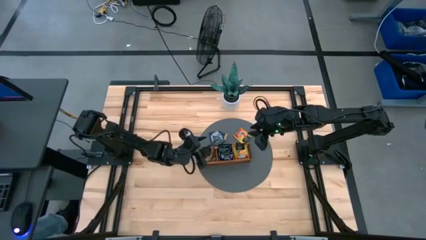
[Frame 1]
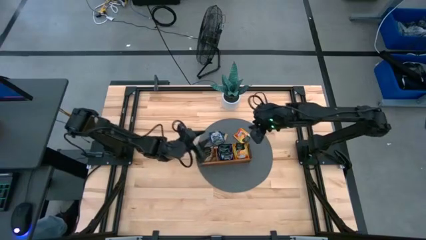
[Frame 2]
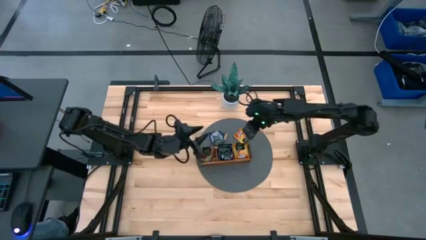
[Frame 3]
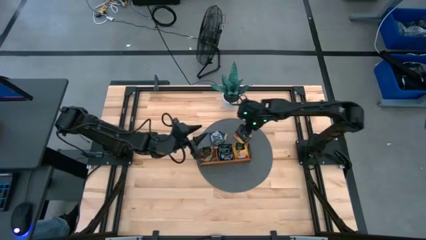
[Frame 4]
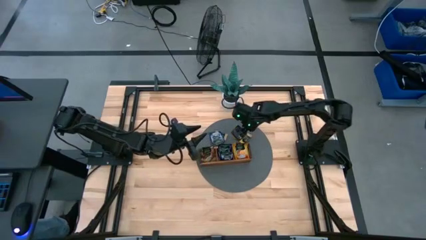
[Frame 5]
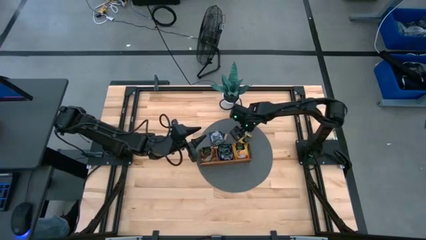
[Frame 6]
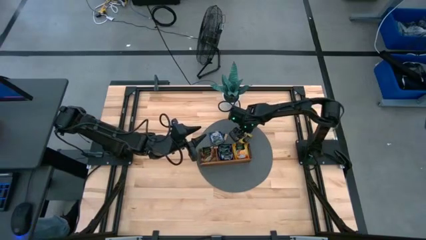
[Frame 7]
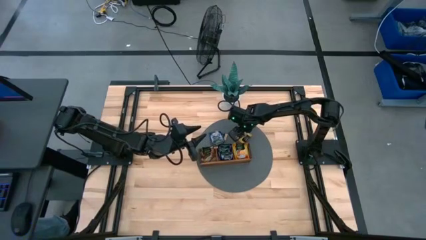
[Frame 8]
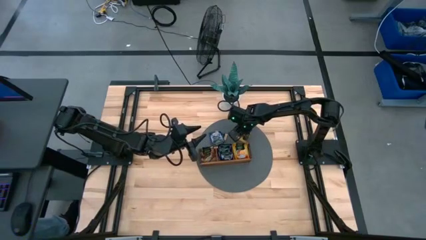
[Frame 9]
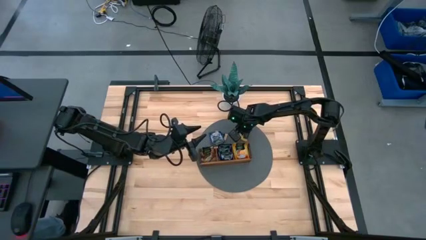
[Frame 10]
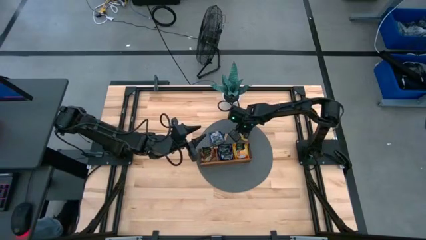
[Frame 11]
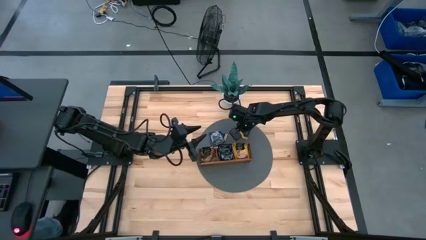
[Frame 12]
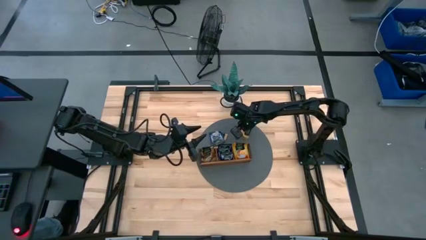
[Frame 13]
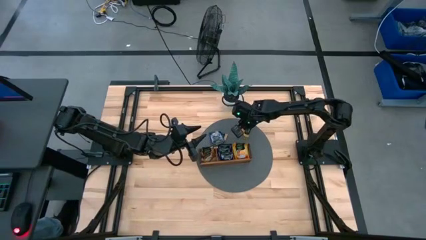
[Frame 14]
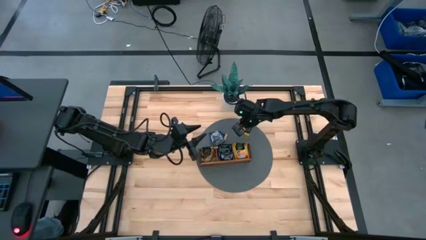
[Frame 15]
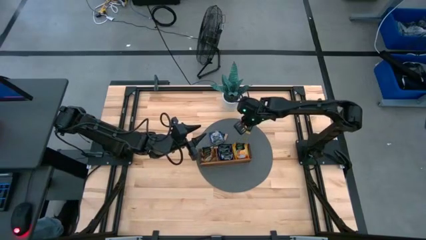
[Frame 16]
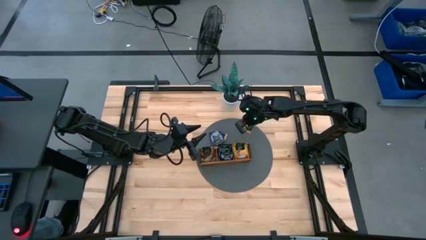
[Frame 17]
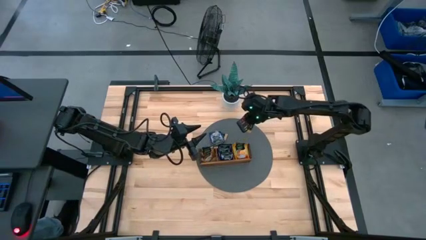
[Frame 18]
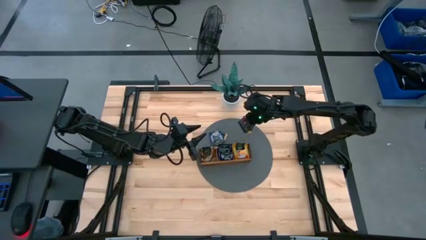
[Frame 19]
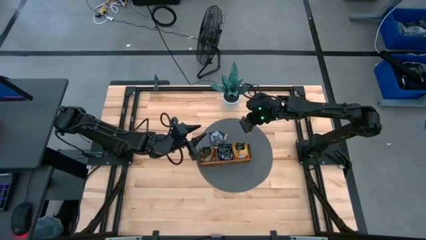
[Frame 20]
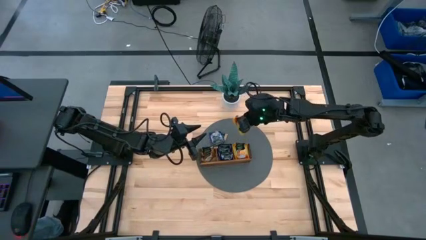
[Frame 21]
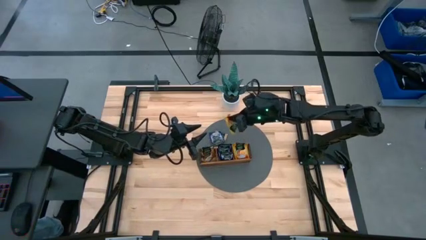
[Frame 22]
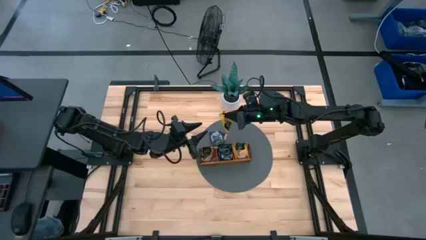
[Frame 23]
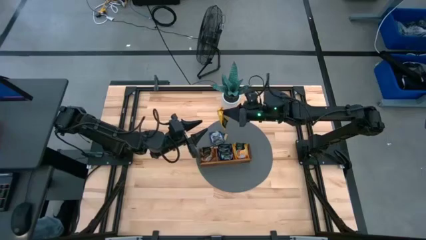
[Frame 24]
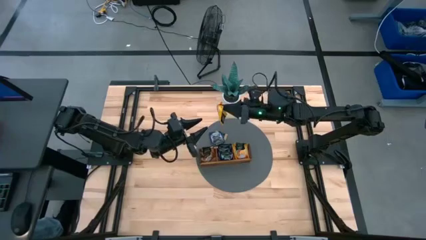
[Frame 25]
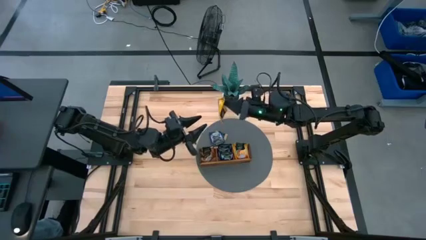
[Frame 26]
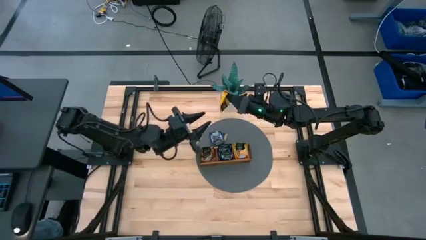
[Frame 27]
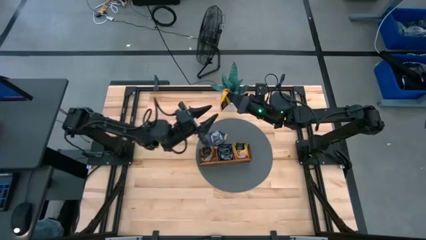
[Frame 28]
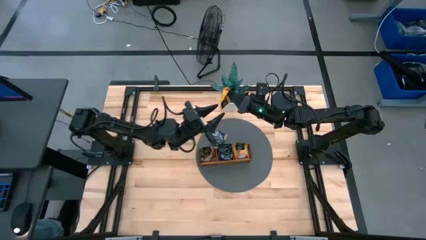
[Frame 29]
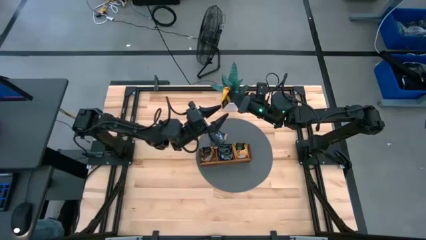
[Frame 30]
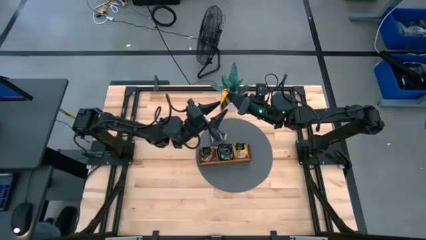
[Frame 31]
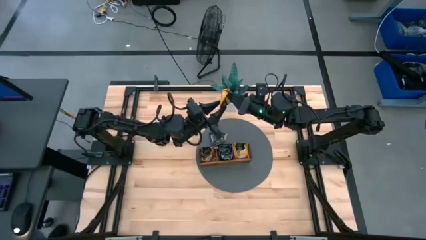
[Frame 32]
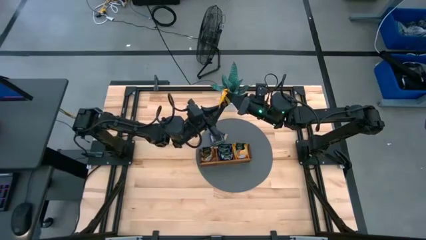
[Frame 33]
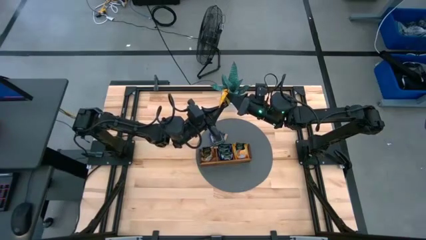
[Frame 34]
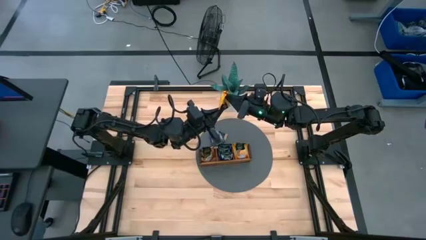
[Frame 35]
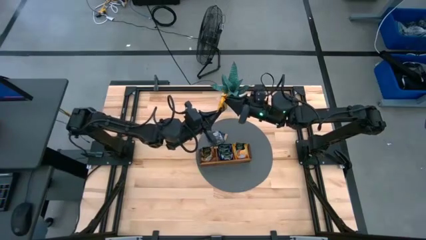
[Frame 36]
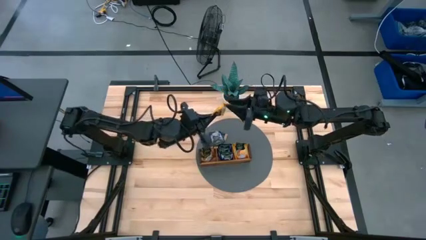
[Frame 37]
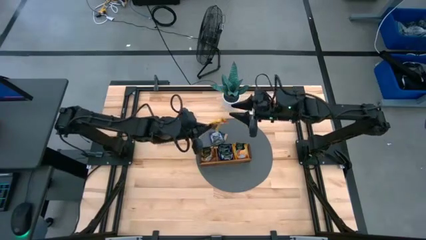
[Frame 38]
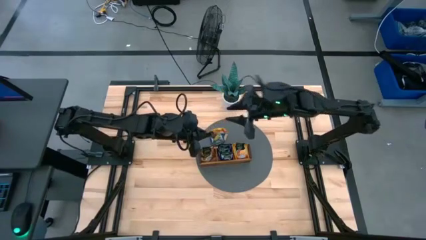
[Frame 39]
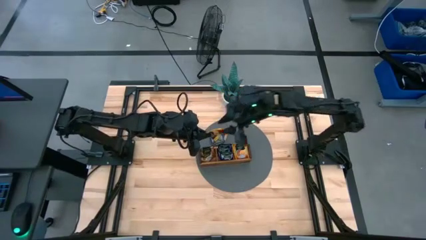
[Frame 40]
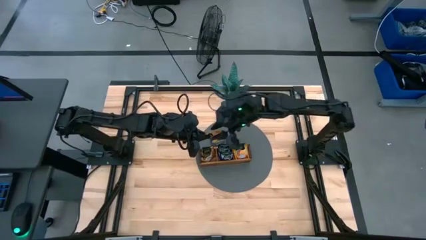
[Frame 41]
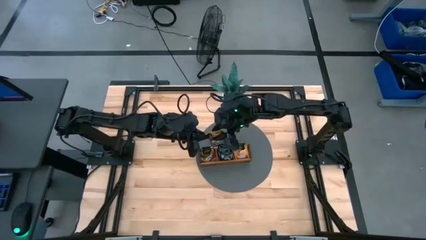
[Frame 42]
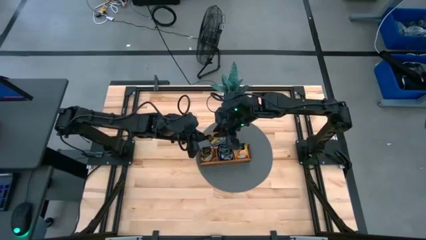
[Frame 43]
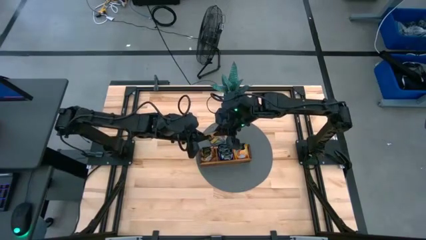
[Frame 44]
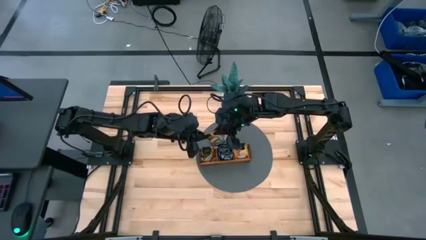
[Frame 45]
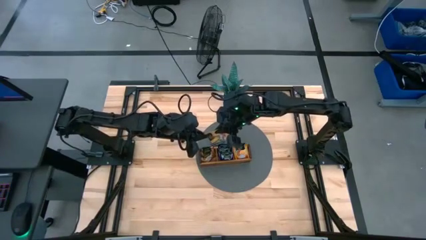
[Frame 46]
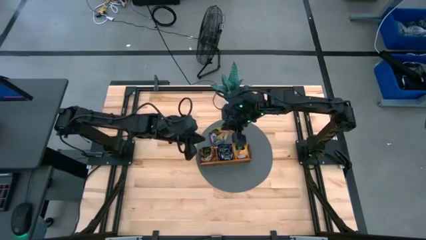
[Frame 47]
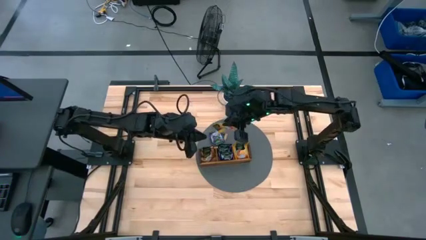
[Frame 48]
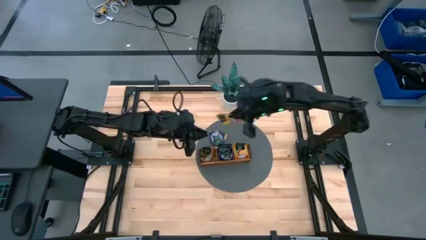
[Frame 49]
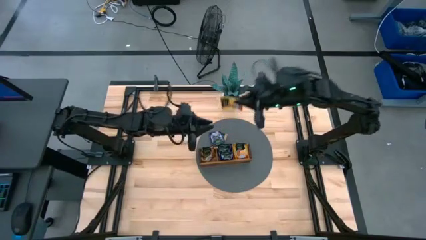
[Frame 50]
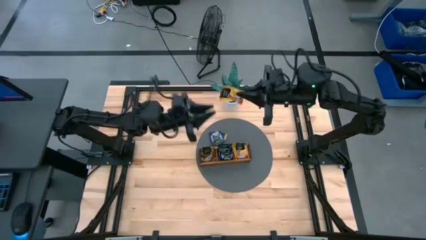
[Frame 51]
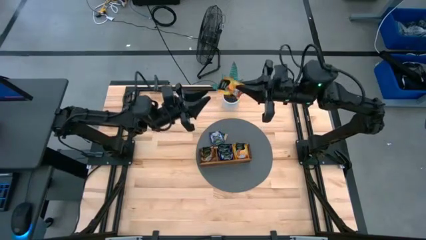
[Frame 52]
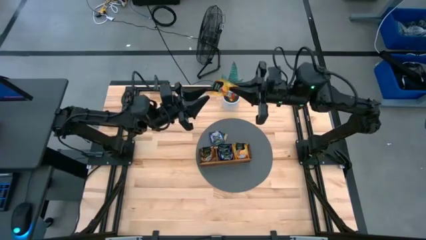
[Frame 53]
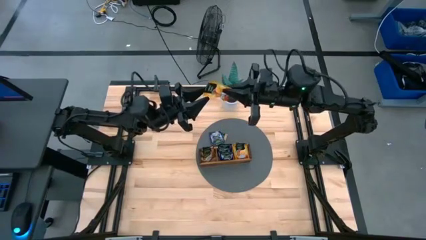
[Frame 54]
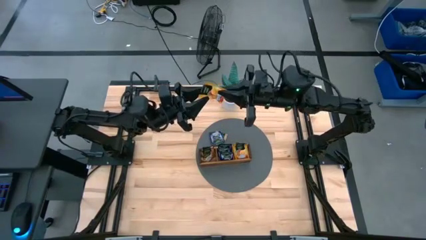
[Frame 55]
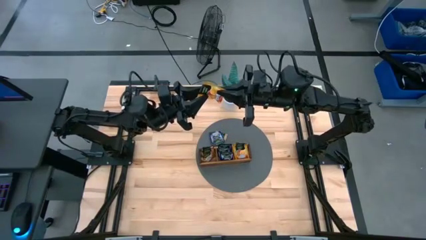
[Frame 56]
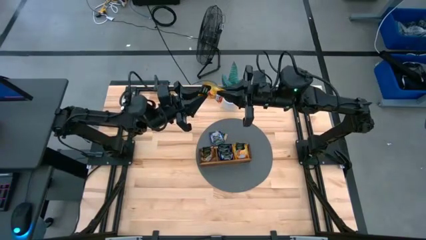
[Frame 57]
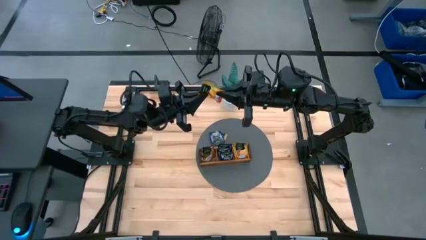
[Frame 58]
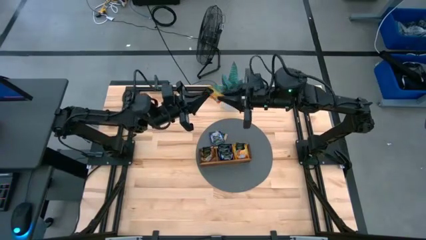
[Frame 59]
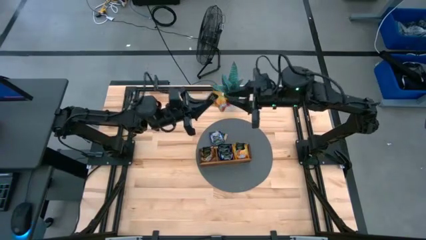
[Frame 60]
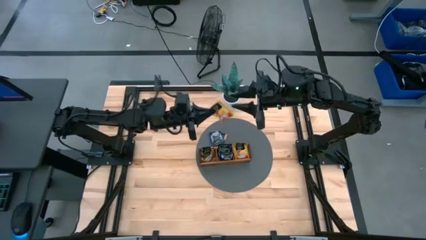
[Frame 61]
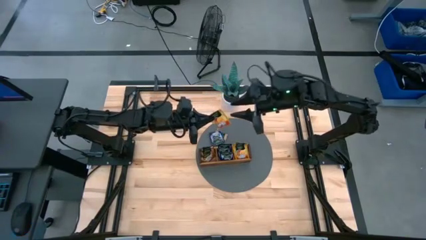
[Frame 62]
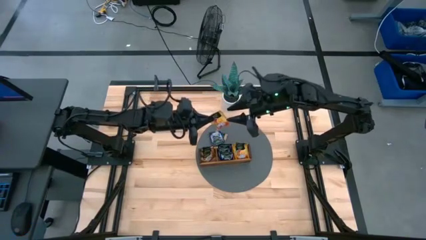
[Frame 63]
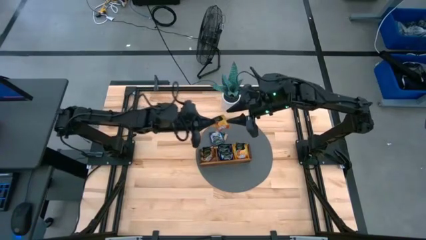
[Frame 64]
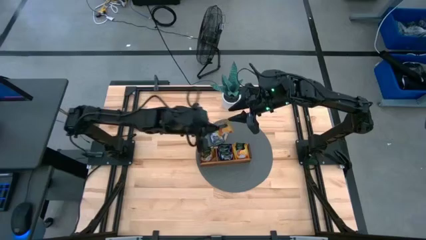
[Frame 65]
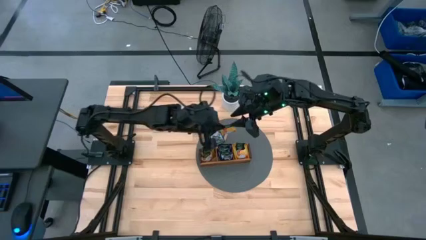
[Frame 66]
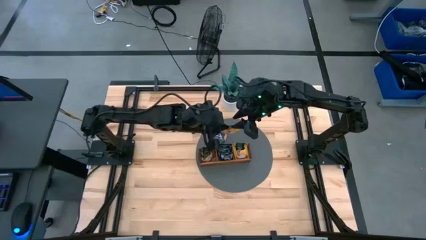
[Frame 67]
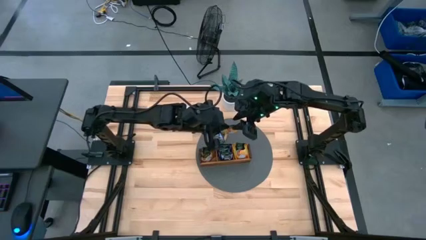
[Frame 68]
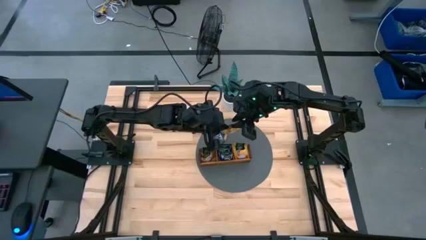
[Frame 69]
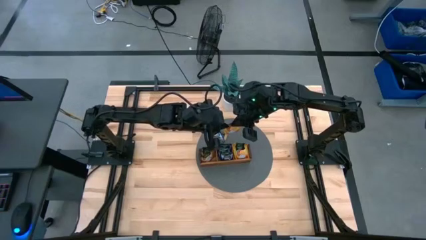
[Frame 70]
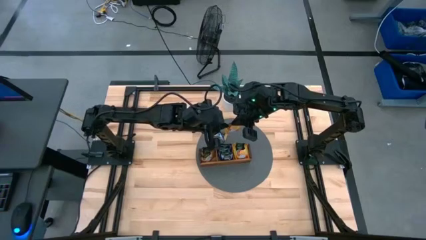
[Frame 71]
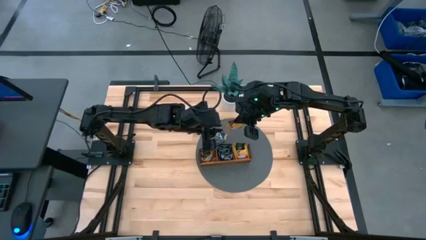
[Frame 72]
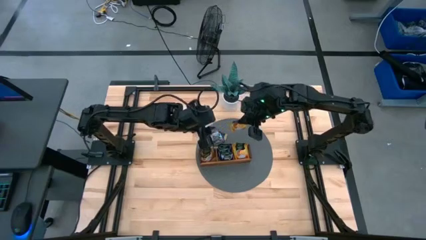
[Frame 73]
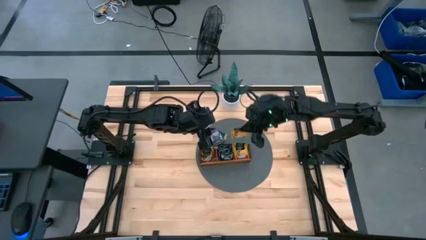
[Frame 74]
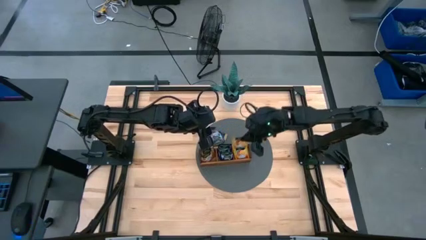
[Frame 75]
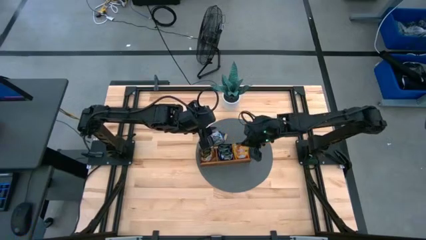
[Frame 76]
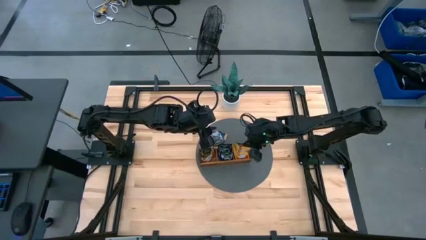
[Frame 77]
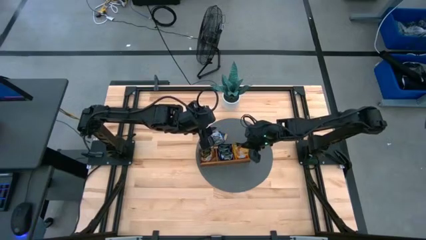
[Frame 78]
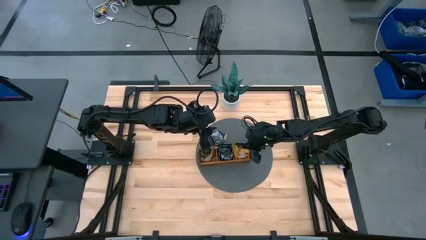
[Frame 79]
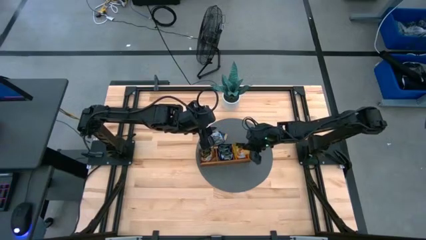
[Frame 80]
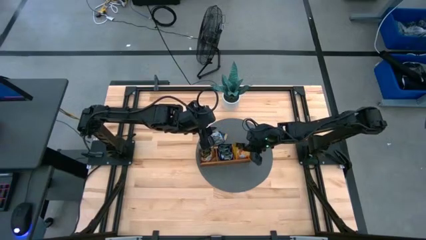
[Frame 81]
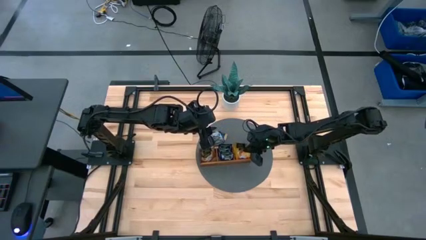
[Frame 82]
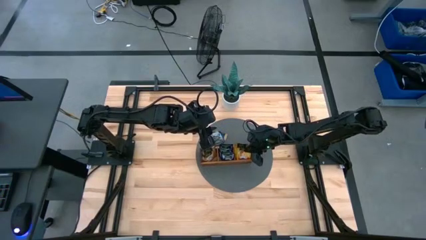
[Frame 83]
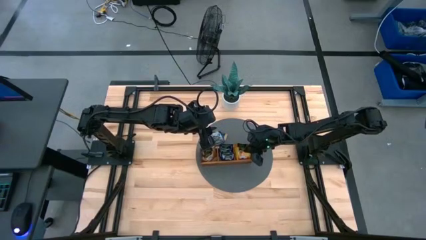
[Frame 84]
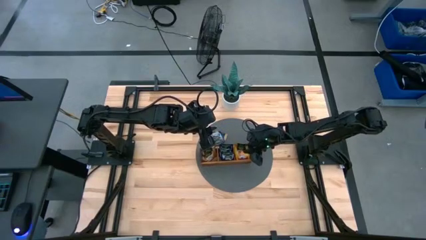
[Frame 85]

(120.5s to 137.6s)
Task: Pick & Place Tea
Put the yellow tea bag into the right section of the wooden organizer
